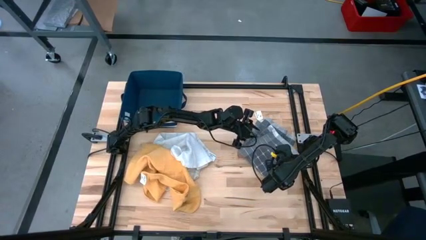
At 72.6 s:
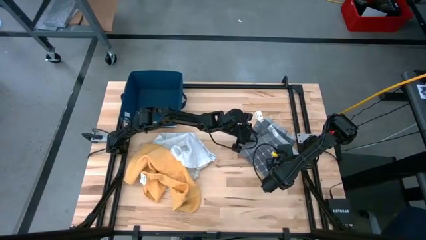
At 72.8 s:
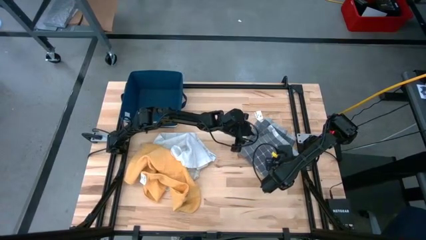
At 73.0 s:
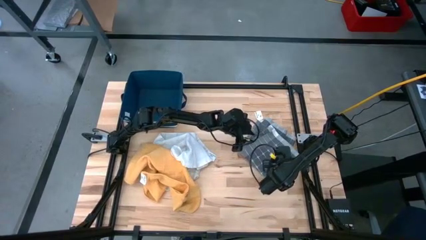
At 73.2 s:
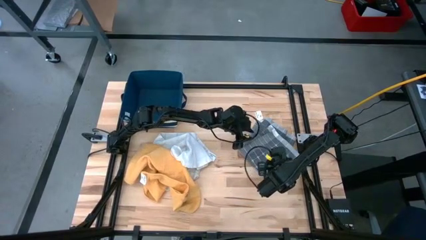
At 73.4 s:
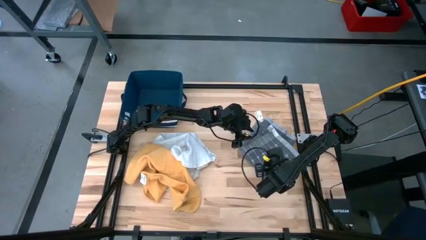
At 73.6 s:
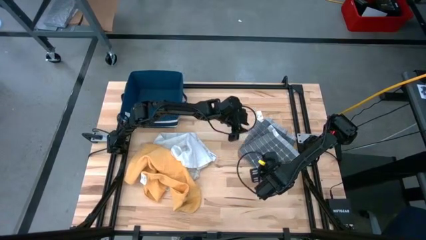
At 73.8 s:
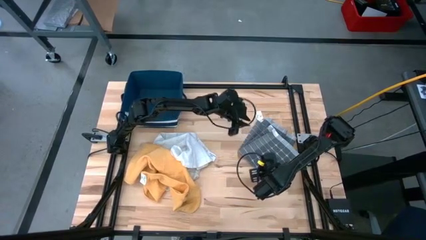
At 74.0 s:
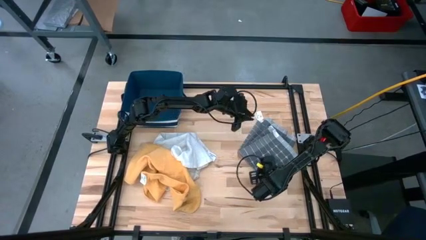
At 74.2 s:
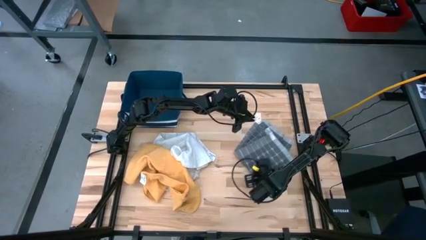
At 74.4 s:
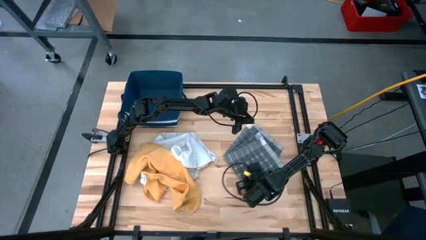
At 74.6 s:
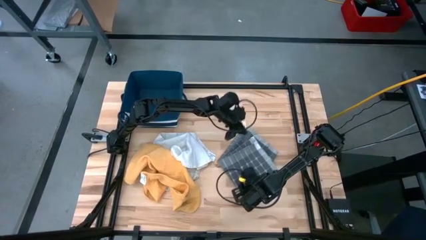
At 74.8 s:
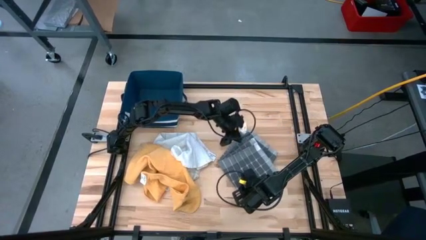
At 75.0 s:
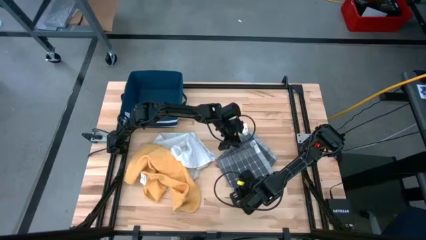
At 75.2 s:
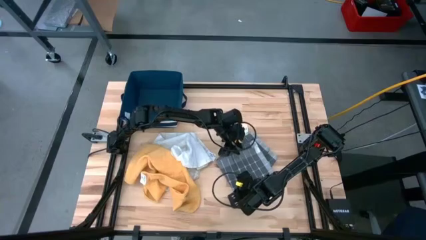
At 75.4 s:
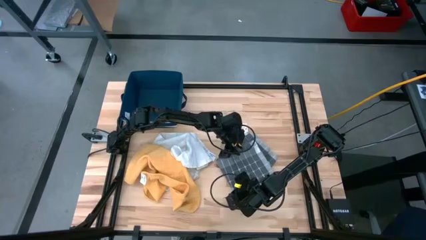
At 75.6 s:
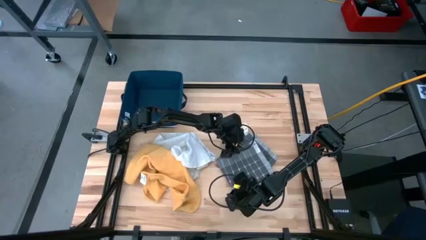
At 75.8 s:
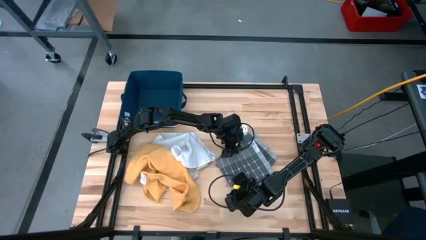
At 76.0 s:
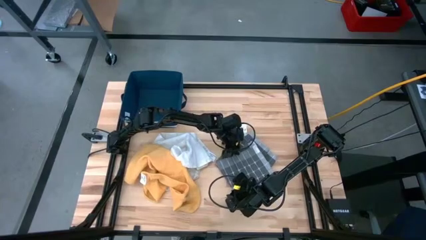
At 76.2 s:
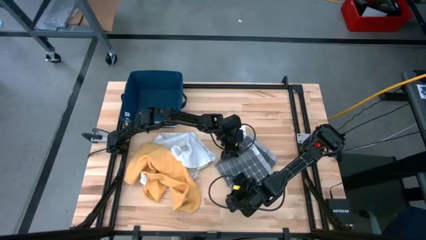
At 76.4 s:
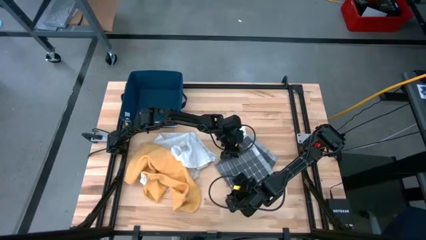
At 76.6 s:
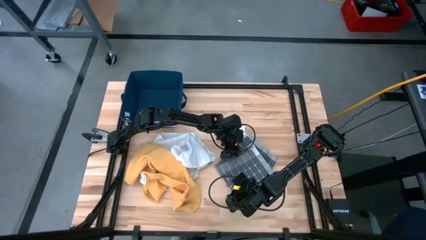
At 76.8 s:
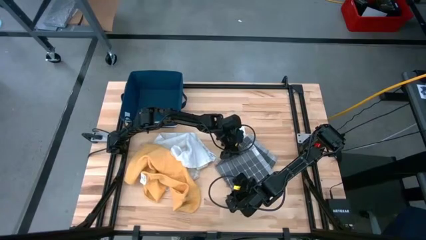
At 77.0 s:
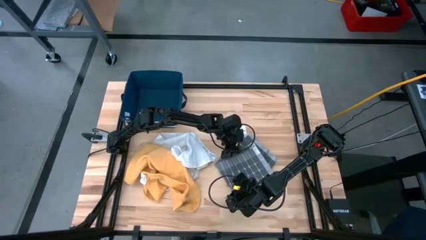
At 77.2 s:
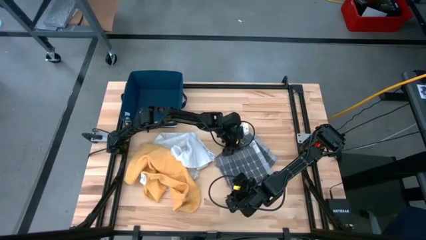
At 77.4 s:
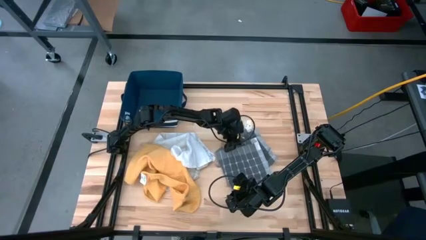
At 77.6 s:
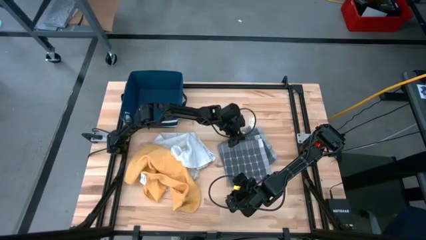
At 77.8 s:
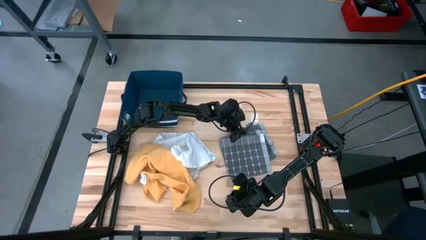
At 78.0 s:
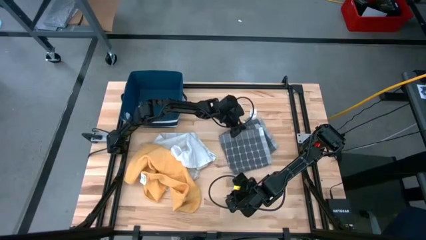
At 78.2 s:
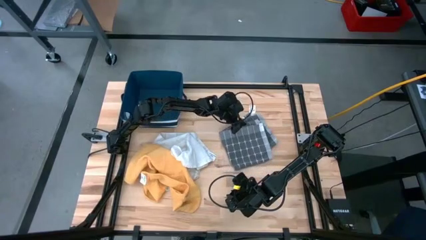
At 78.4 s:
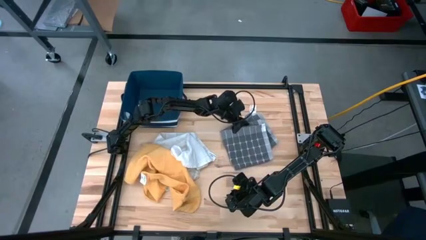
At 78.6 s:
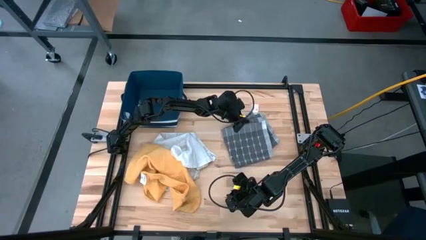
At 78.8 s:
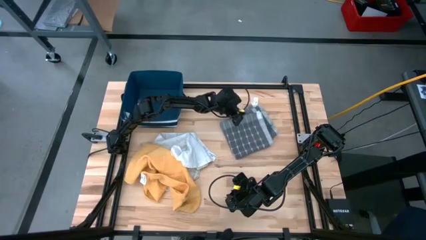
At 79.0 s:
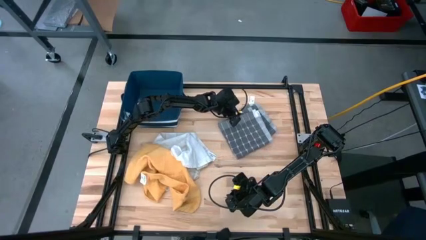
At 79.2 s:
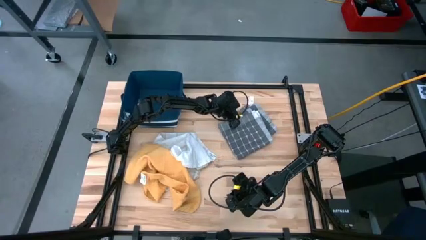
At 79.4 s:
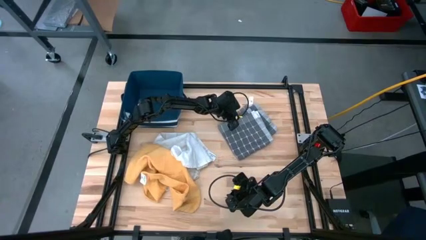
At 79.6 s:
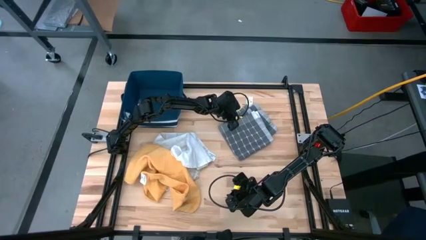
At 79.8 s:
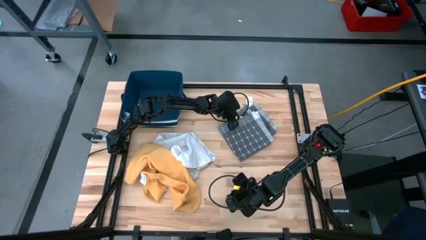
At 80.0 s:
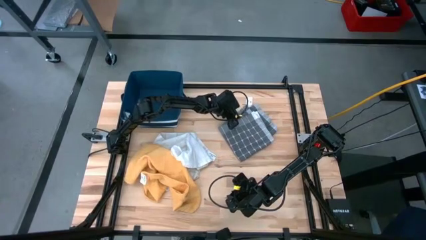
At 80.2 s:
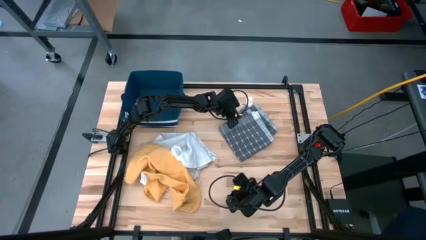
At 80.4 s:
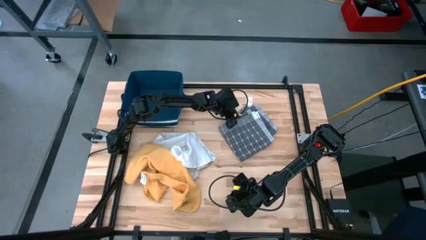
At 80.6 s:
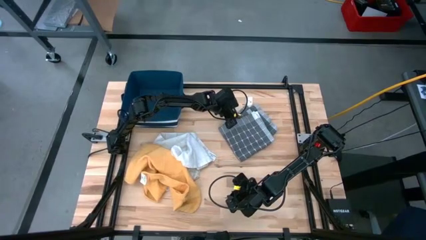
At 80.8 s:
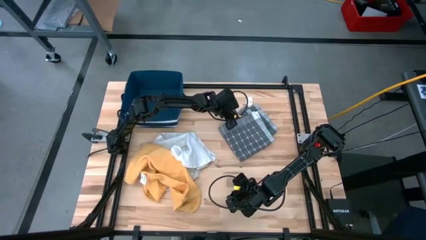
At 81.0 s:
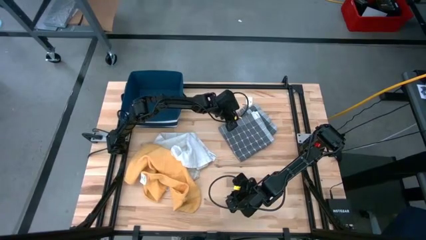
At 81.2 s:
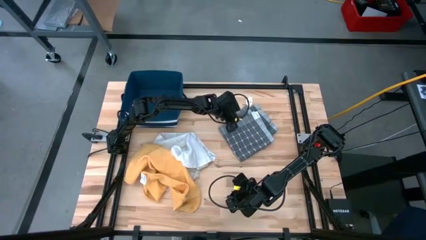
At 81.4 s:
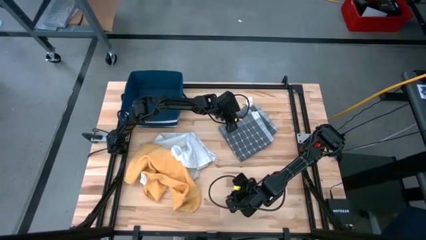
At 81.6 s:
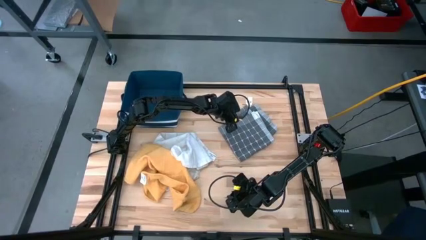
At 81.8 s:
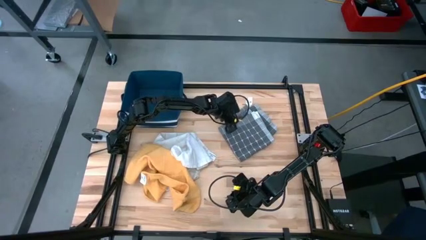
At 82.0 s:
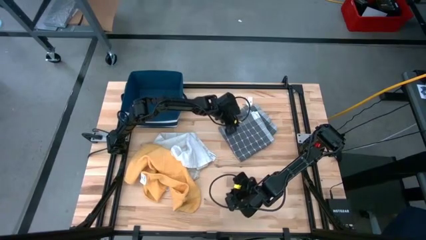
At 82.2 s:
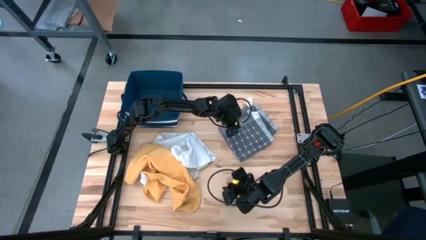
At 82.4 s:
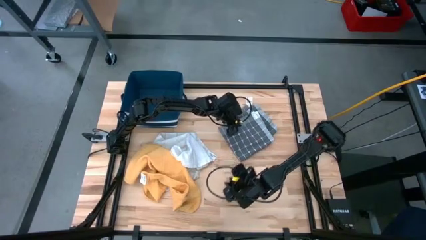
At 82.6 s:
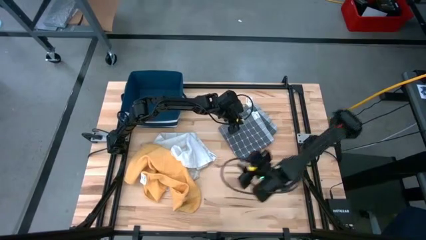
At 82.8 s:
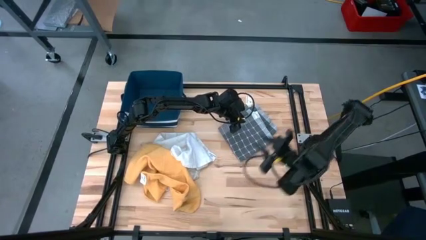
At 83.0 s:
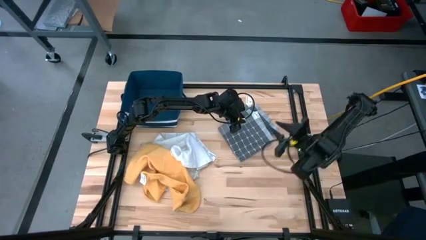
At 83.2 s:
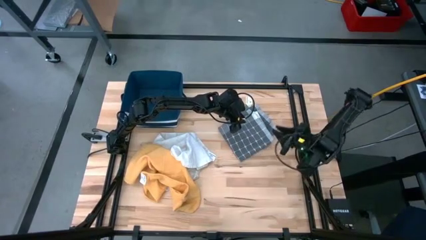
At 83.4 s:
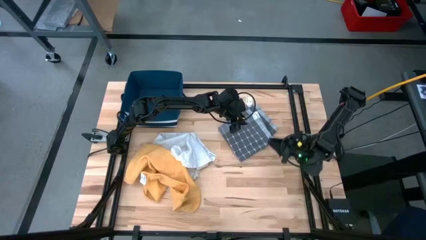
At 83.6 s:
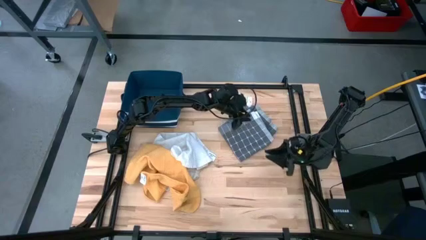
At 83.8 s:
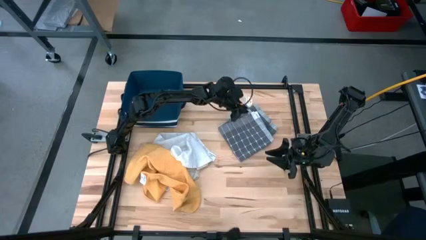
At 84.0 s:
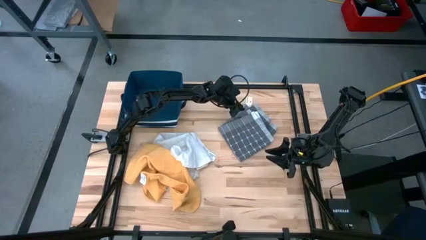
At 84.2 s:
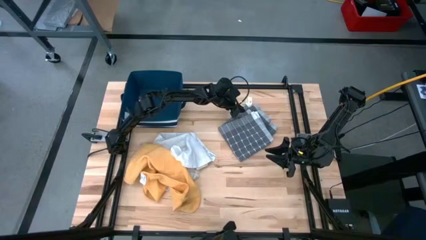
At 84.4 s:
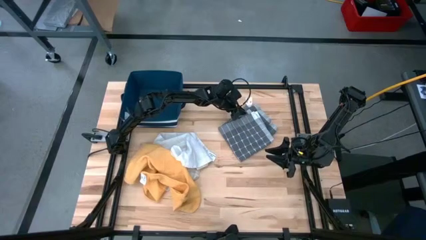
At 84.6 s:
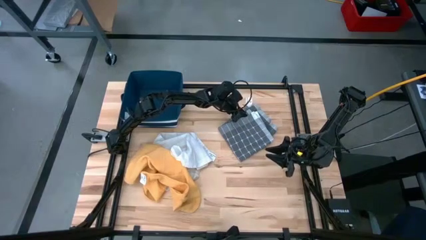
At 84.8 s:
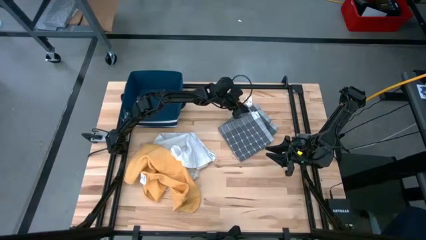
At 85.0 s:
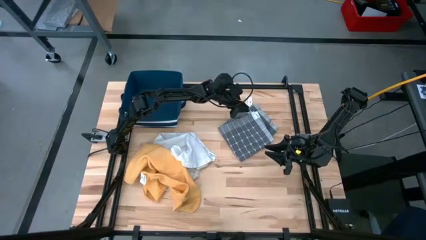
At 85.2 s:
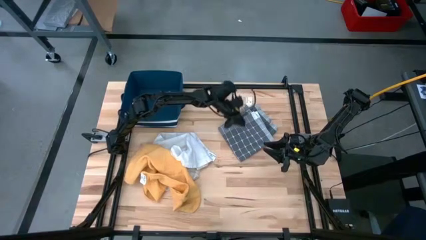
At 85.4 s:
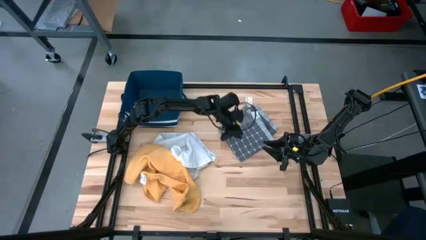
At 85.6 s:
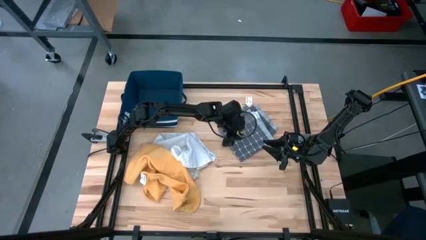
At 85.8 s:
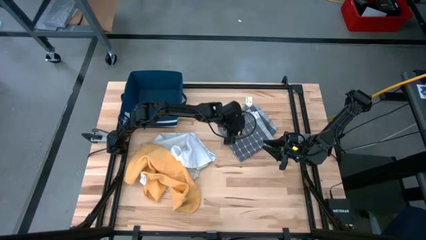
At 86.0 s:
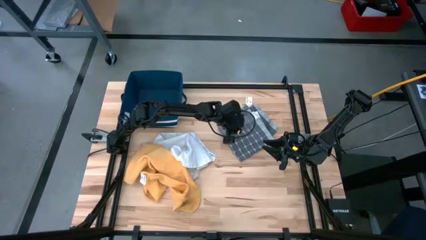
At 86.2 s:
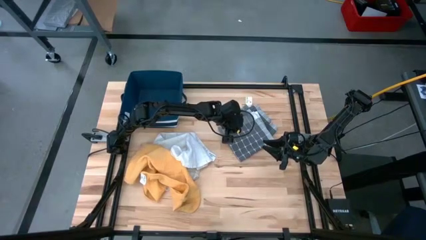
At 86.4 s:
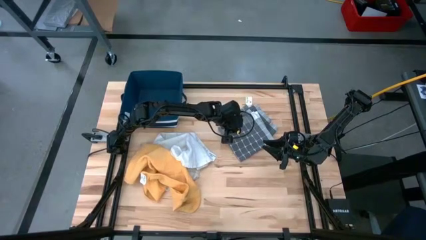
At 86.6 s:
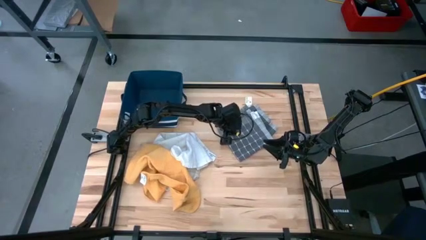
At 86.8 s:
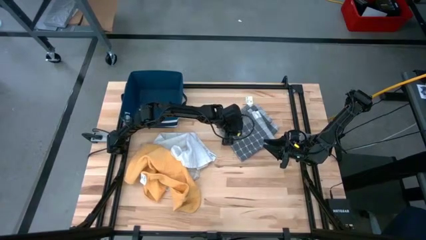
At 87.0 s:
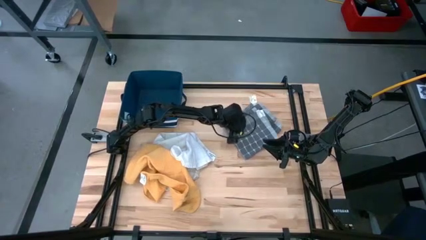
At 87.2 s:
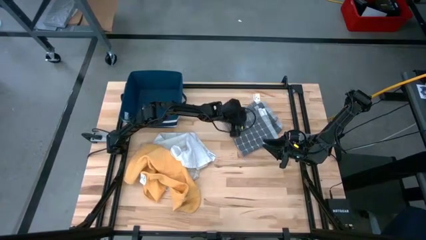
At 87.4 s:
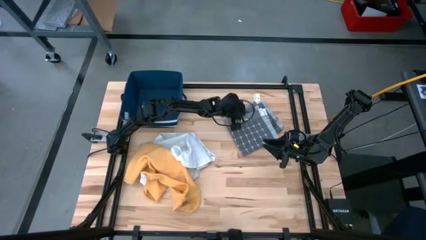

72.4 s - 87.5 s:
Task: Fold towel
Move the gray towel to the top right of the table
